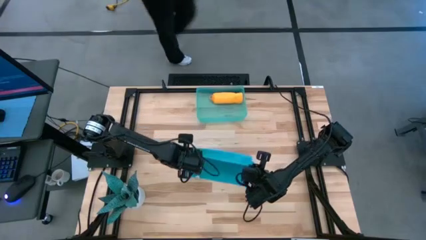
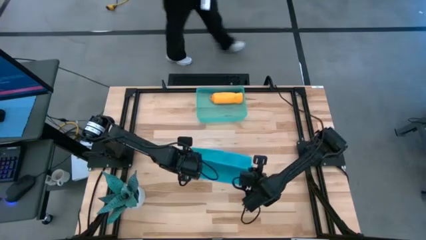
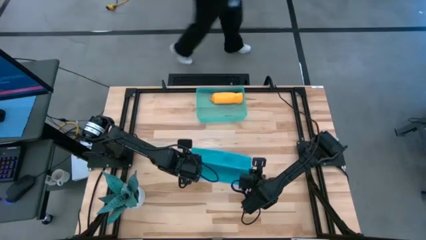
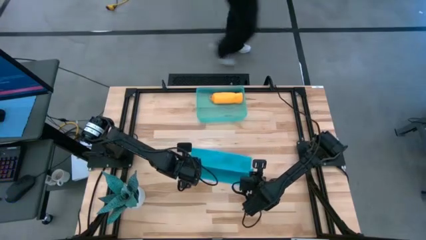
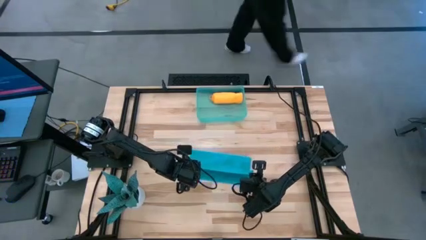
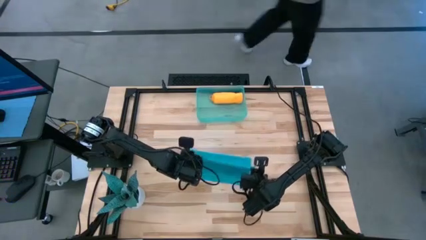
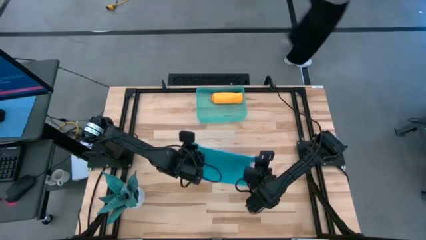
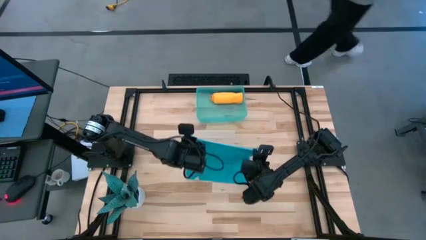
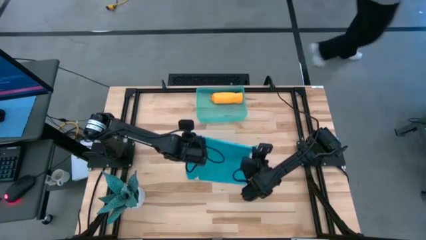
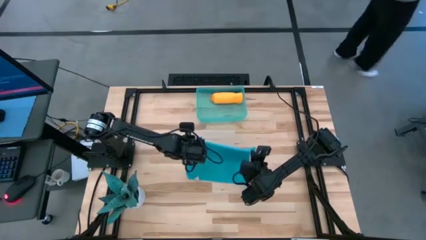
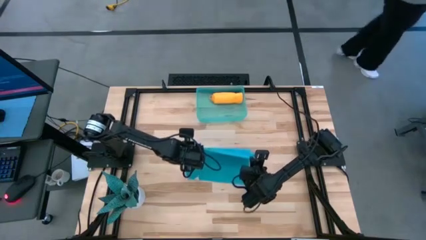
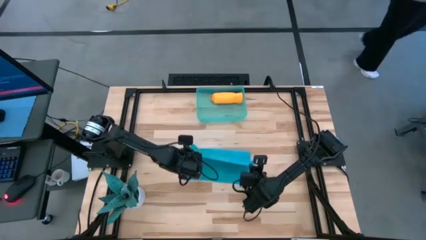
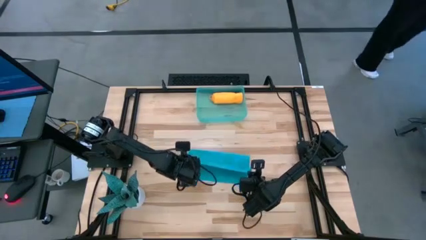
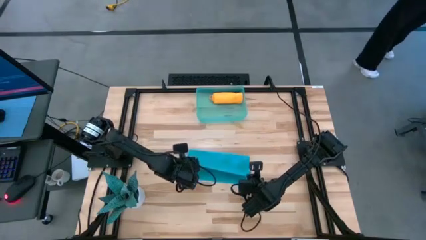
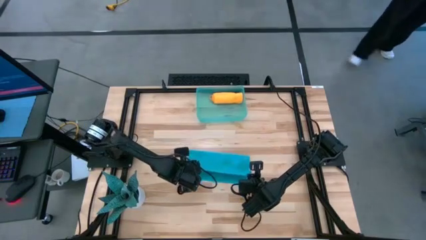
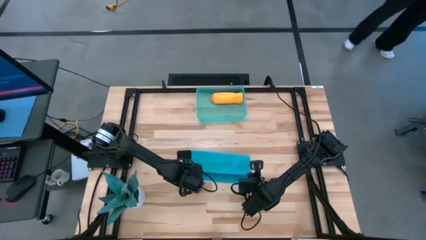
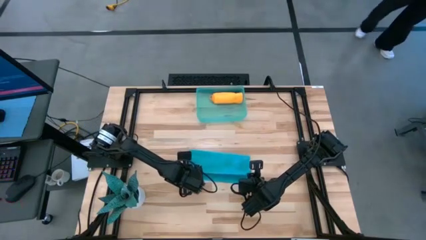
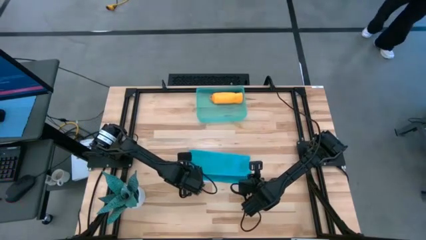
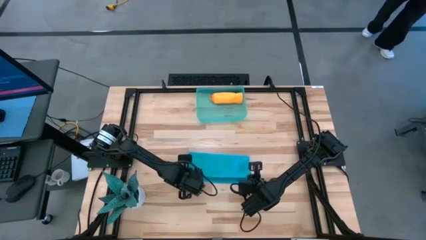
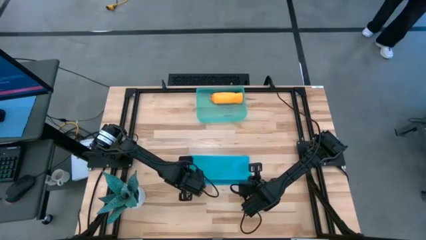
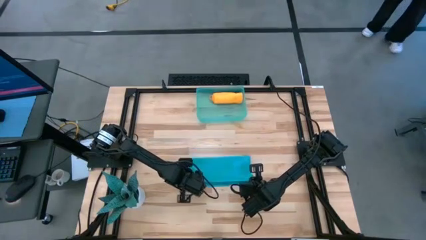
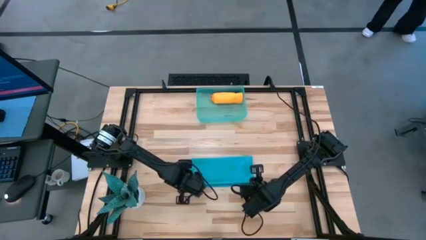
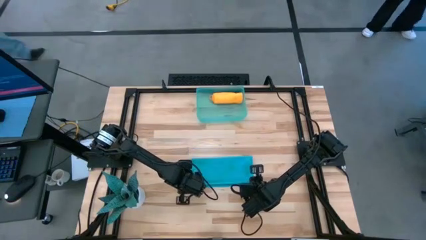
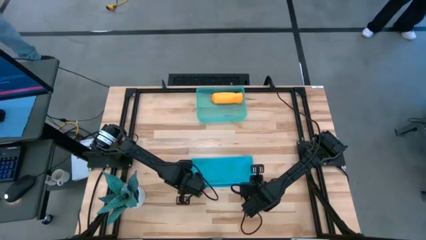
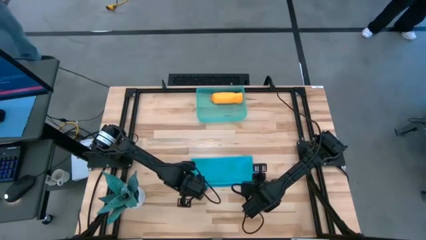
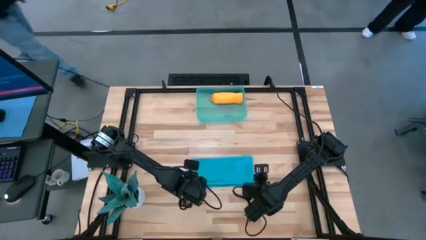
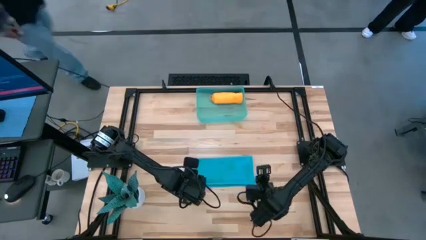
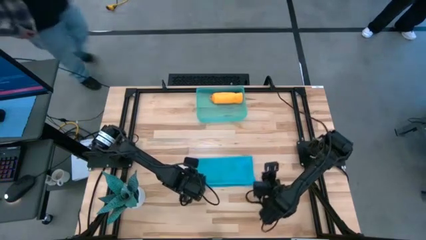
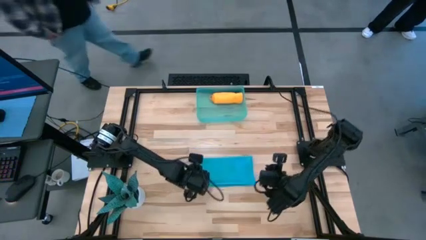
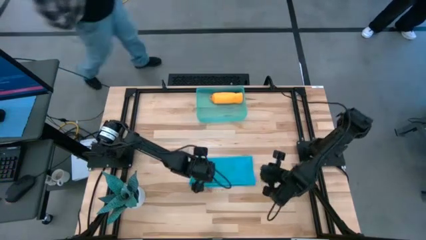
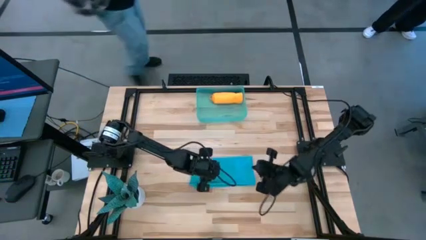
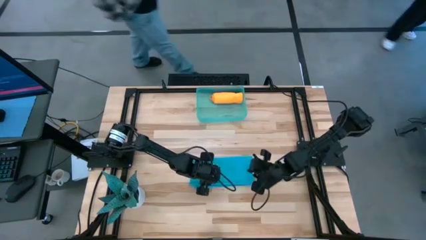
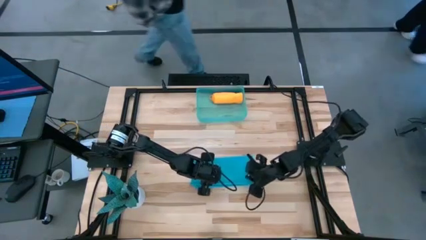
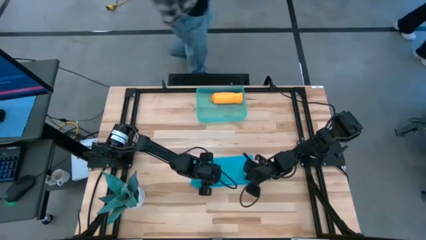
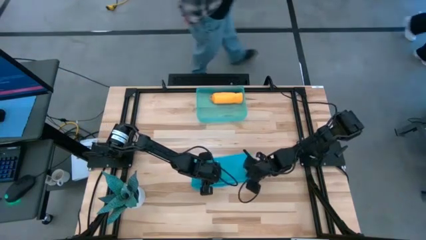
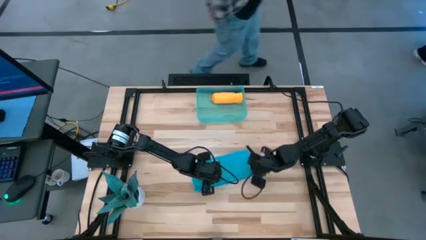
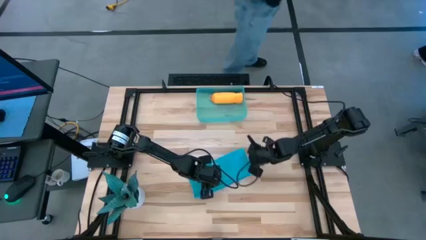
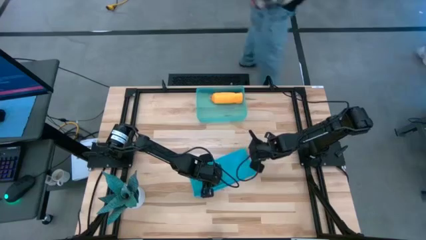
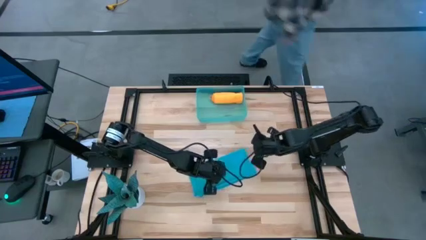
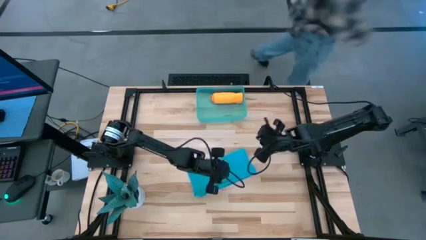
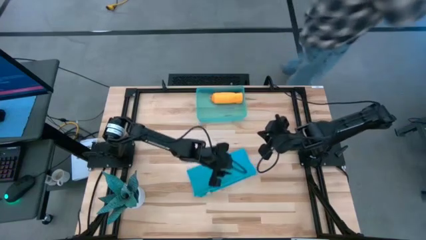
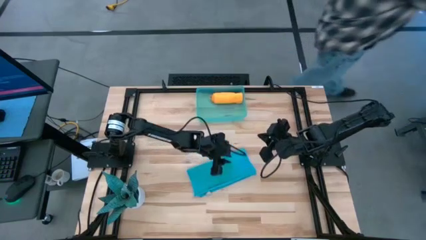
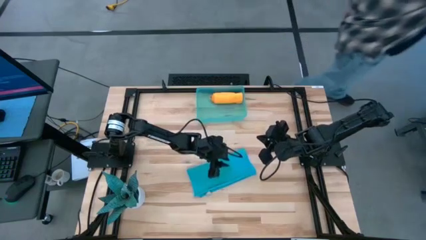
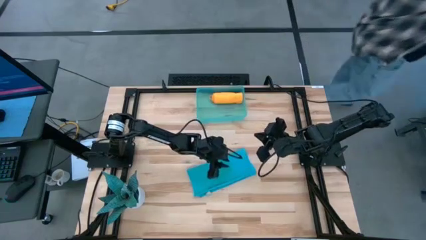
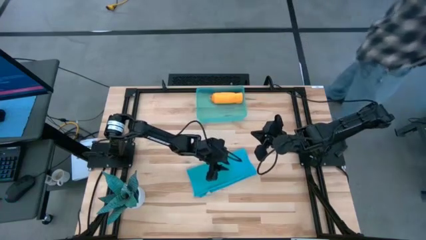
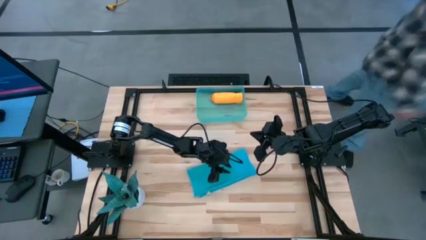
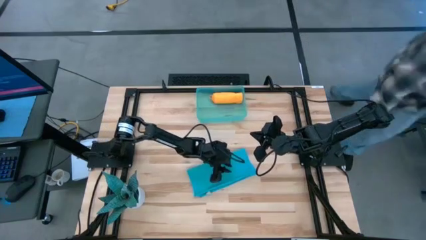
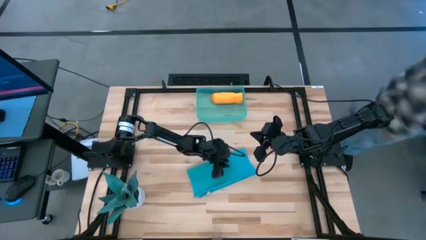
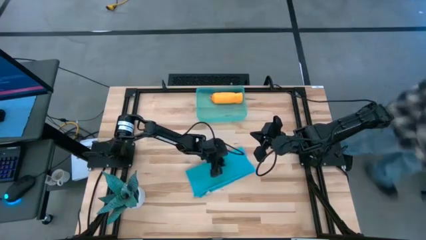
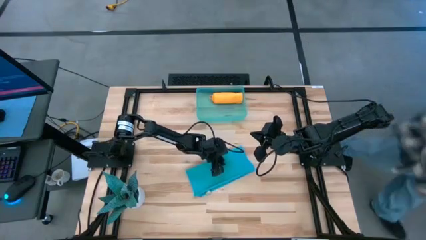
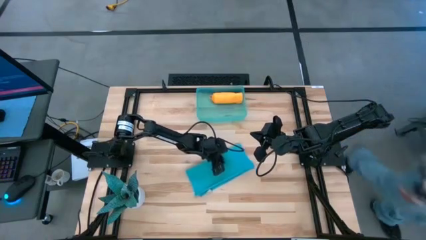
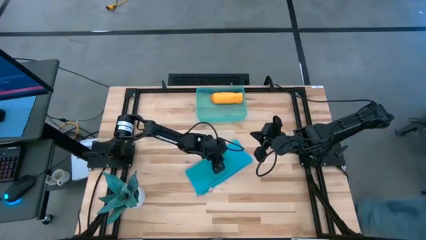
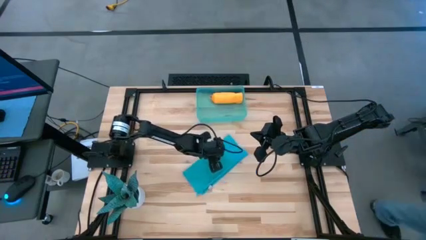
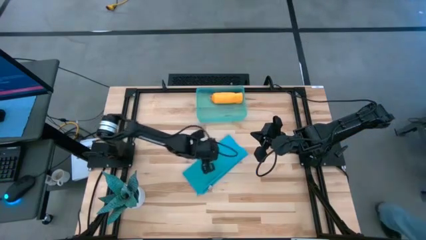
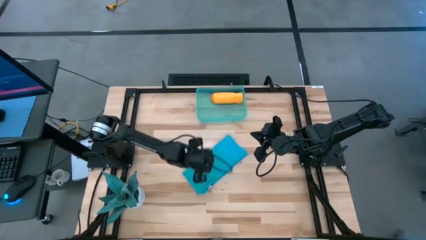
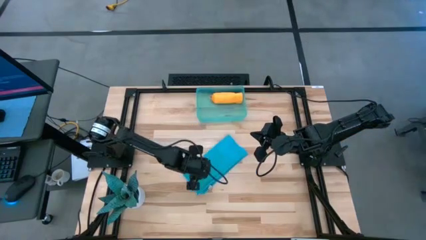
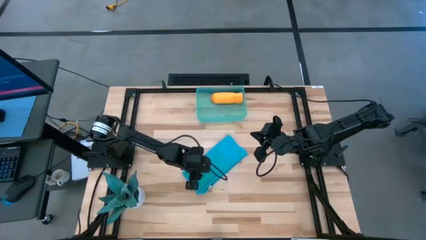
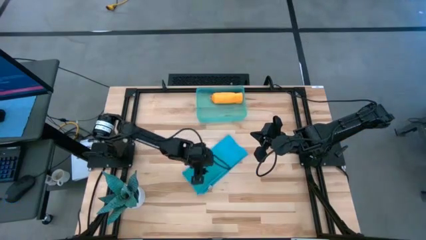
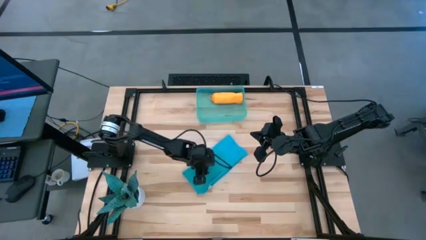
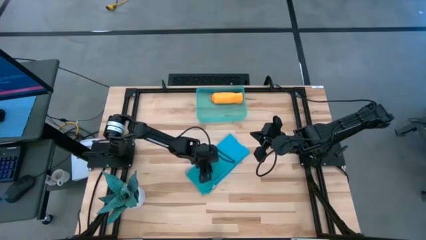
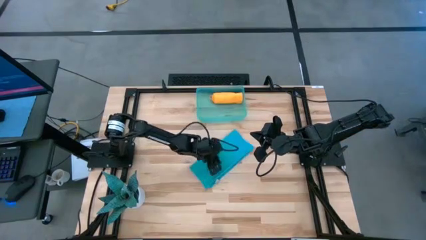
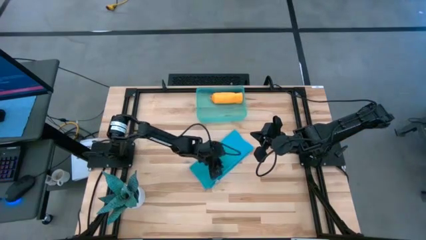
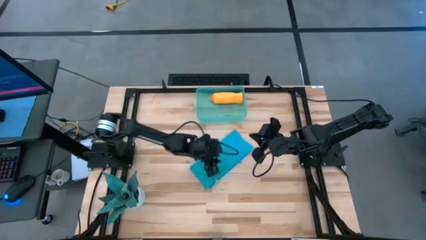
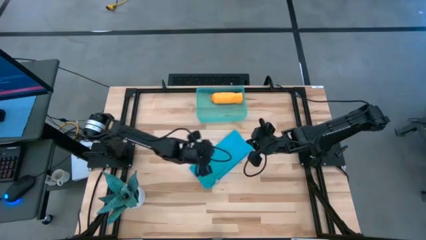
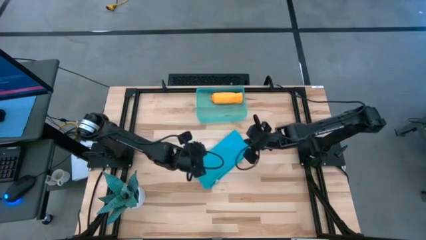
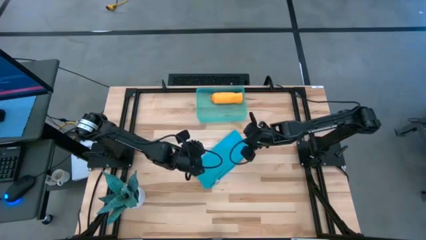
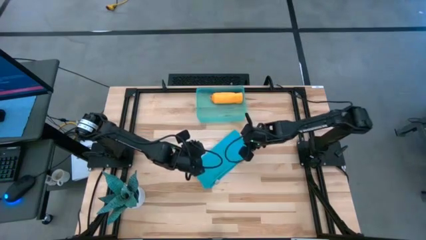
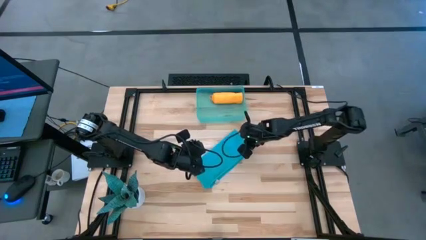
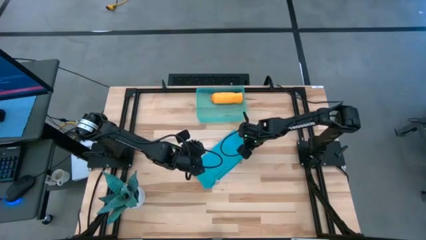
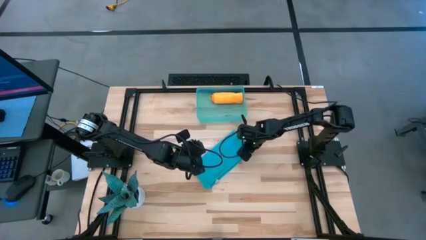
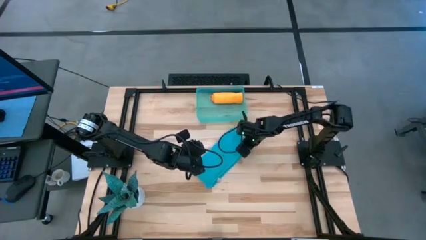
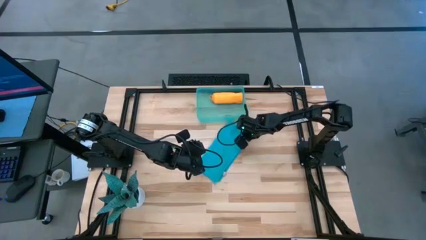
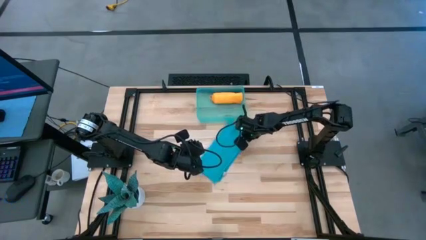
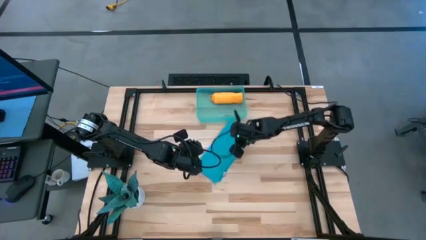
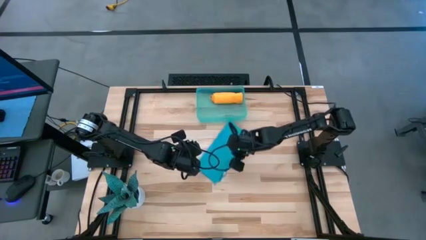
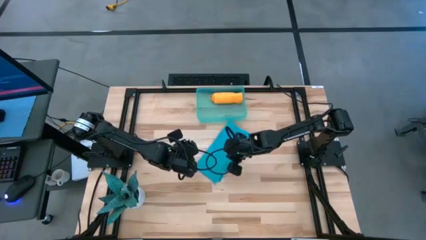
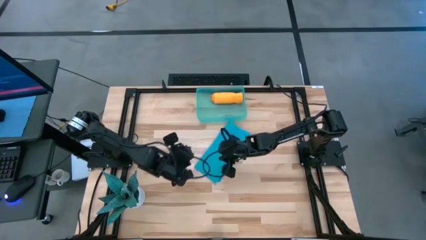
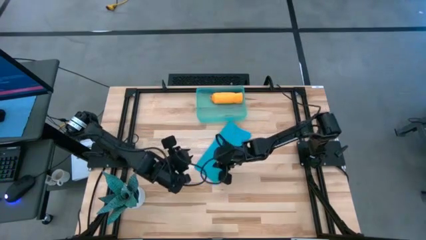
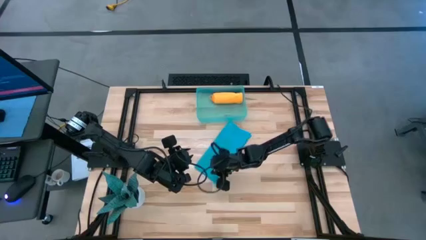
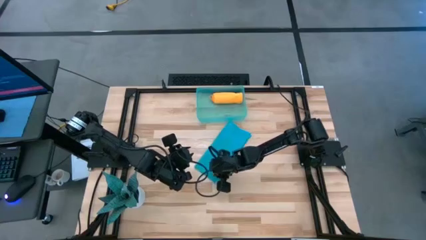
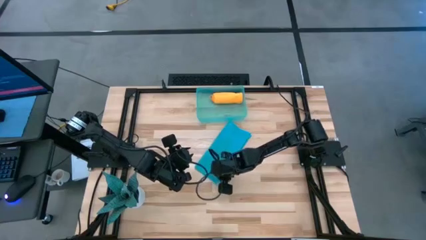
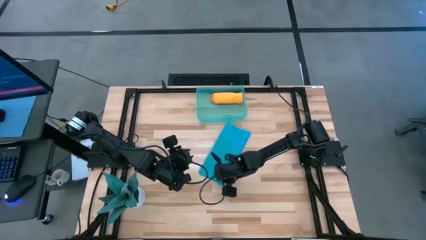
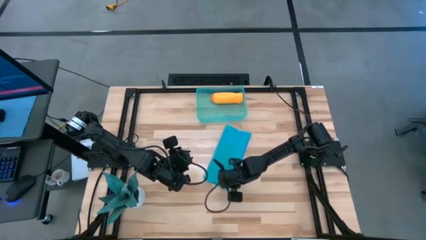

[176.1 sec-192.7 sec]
Task: Roll microfiber towels into tight, uniform cylinder then place into a basket
Roll the blue microfiber cloth on the table
